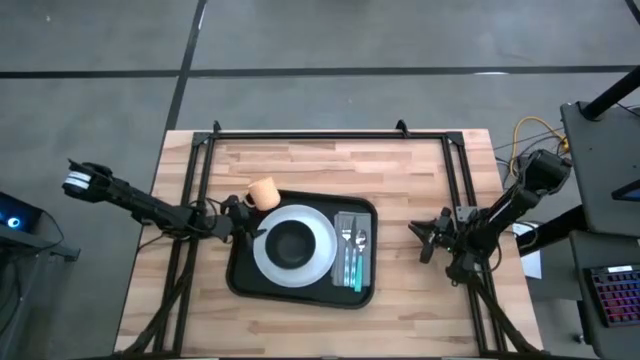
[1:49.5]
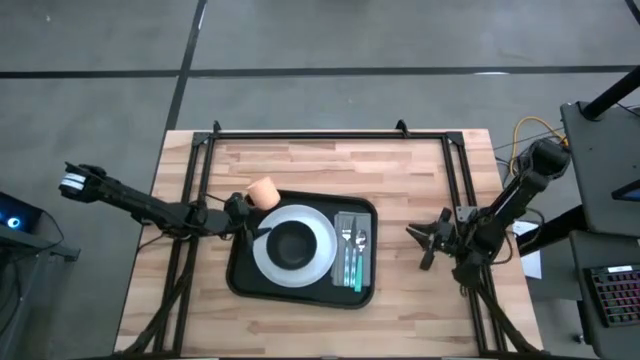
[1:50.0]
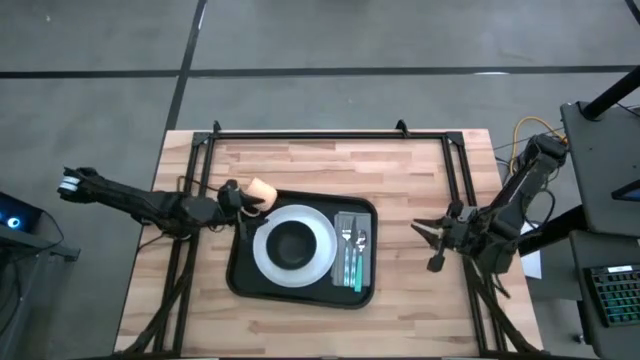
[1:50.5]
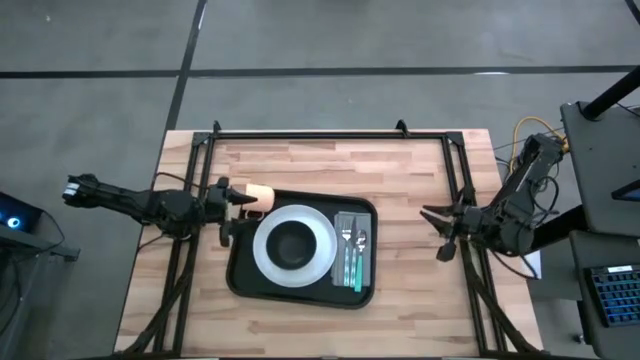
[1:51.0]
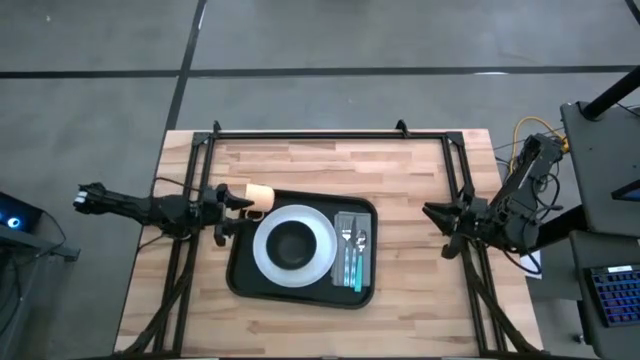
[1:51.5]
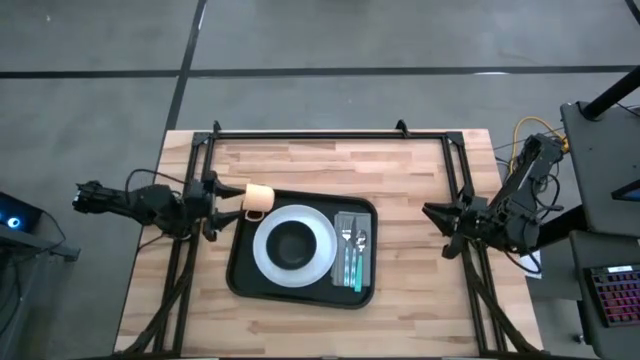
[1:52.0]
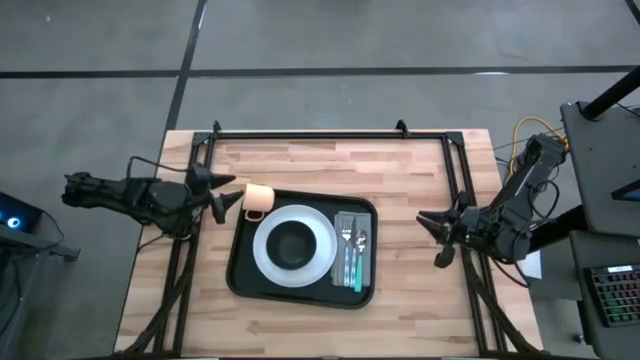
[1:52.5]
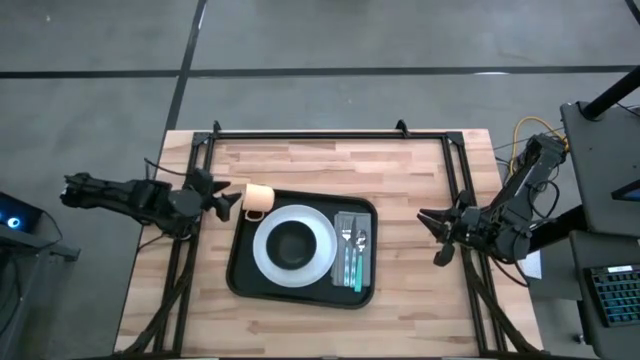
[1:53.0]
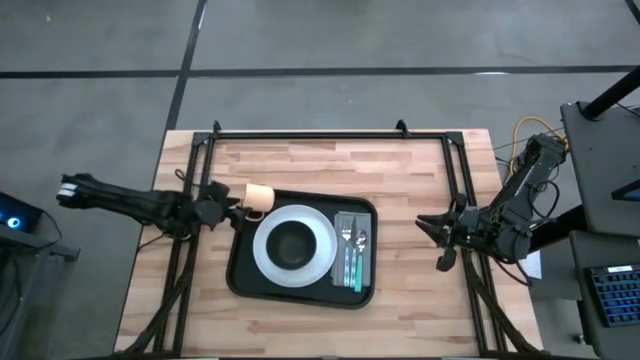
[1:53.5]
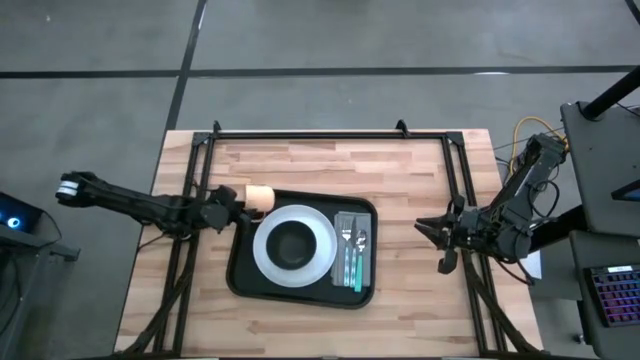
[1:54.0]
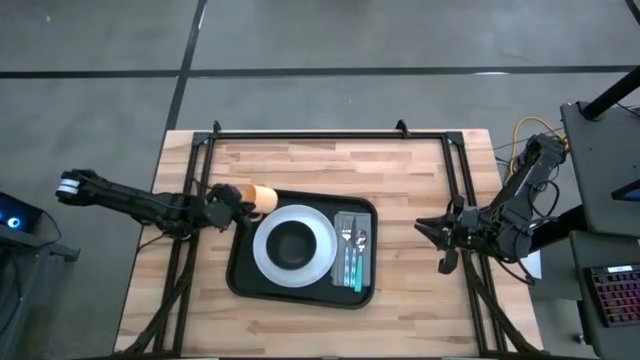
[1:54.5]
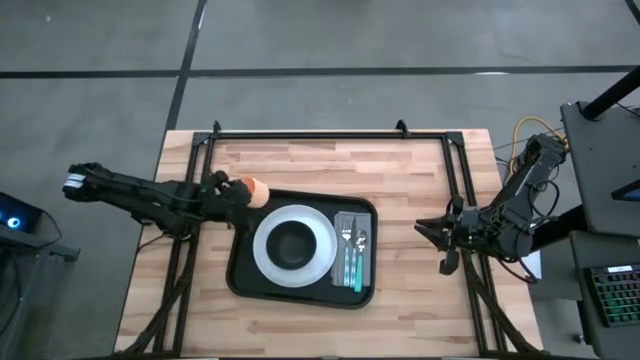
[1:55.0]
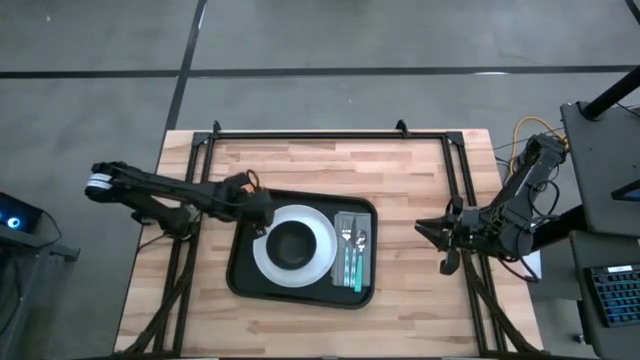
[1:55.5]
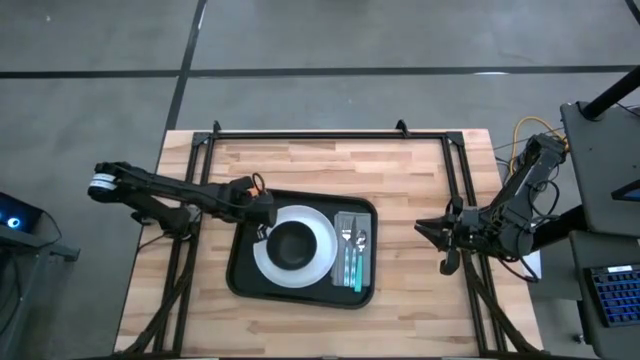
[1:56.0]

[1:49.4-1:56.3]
Task: Set up tray
Adjust the light orange mug on the black serving tray

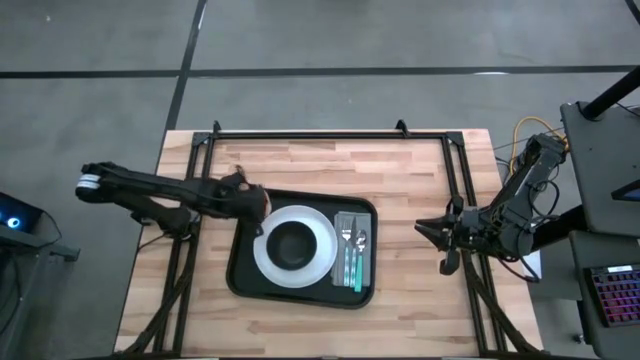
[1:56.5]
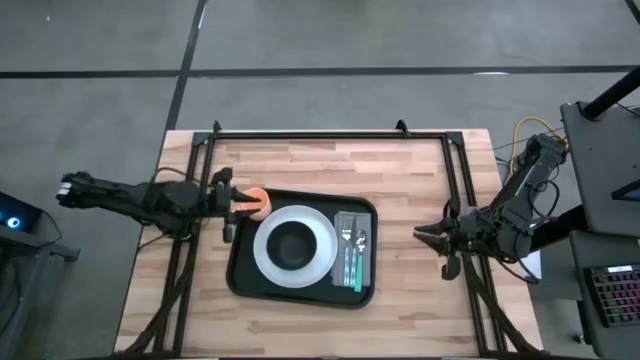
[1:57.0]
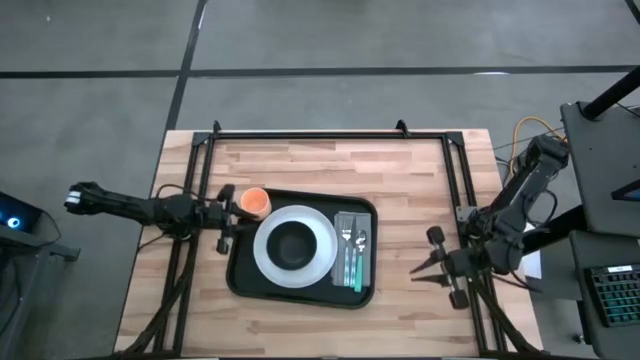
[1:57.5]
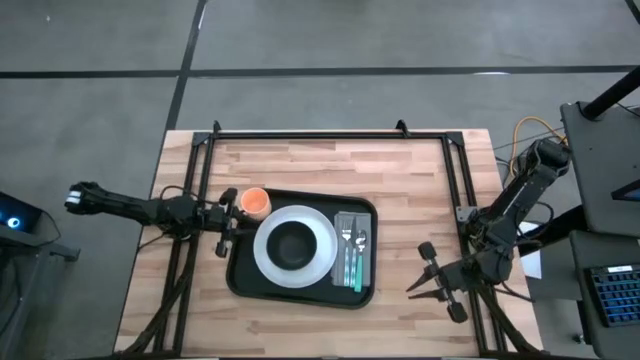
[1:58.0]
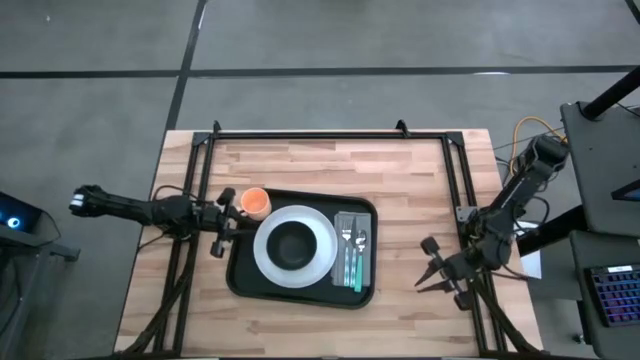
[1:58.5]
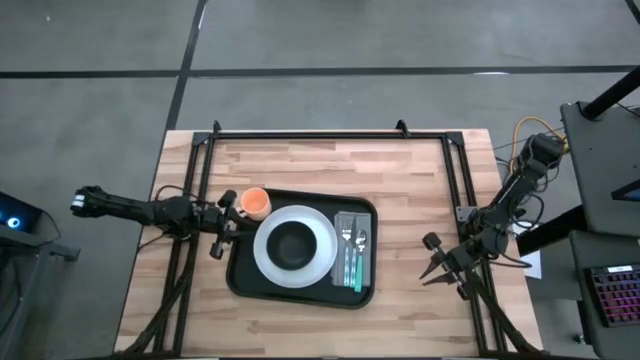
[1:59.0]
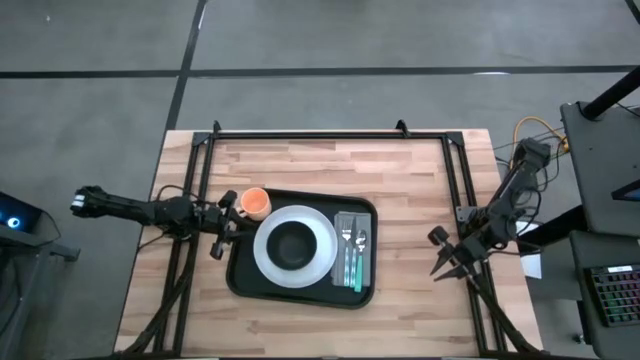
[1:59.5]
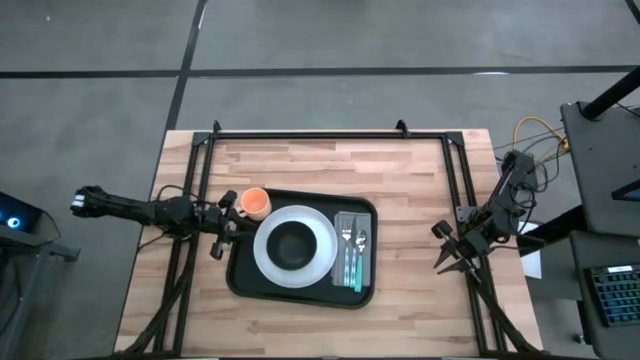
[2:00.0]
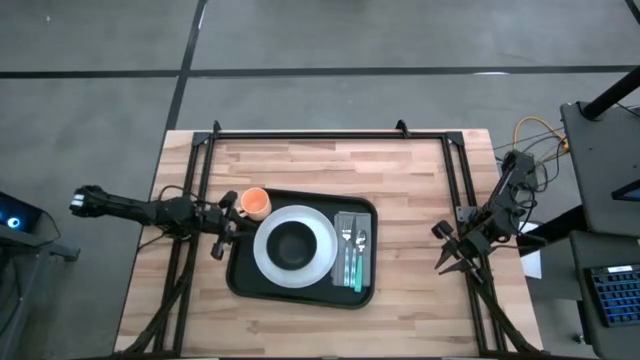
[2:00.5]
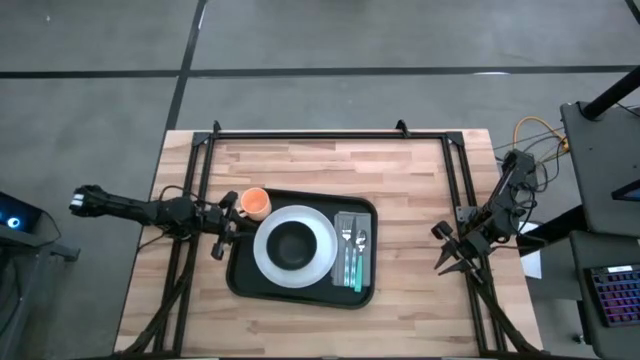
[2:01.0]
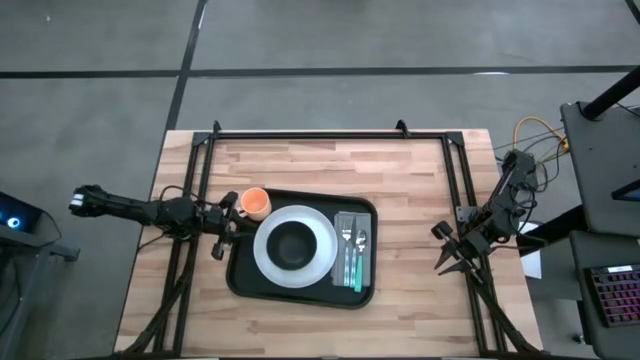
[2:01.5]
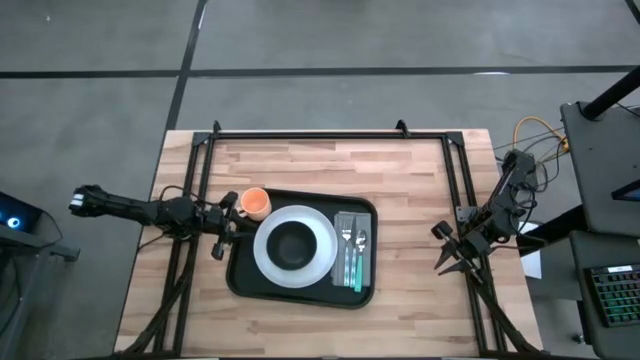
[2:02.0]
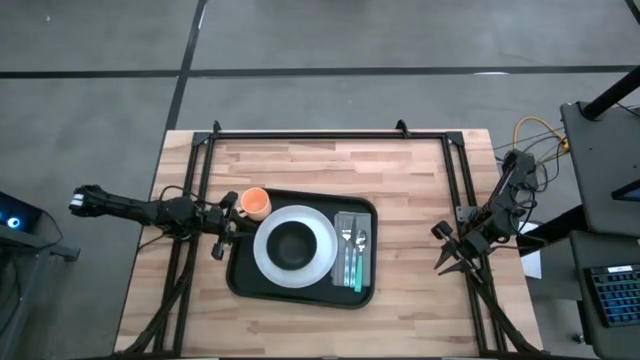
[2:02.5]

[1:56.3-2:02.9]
Return to Home Position

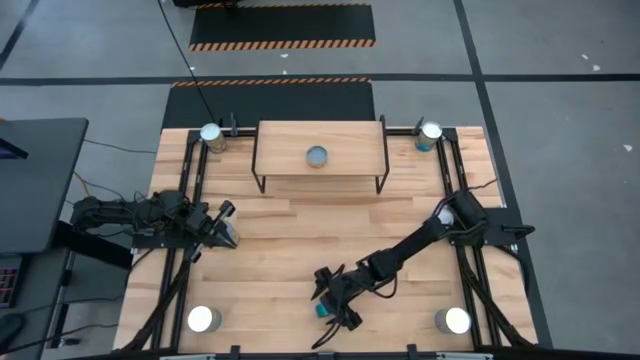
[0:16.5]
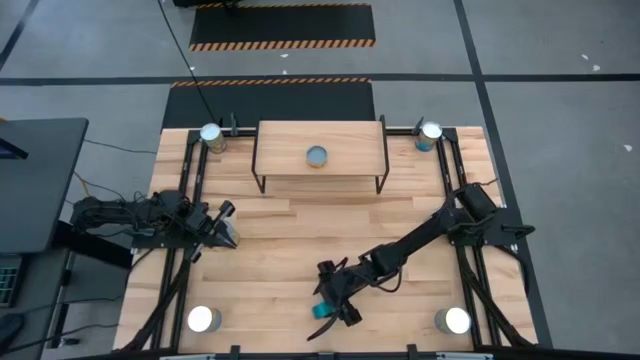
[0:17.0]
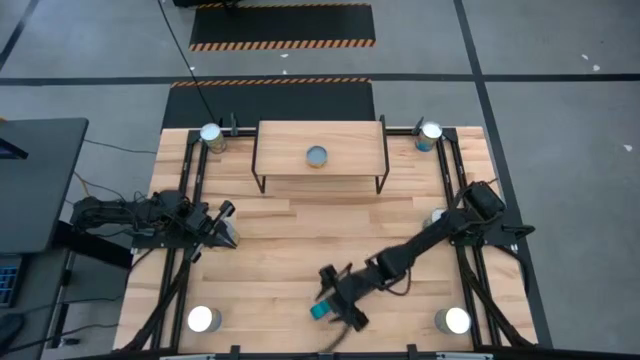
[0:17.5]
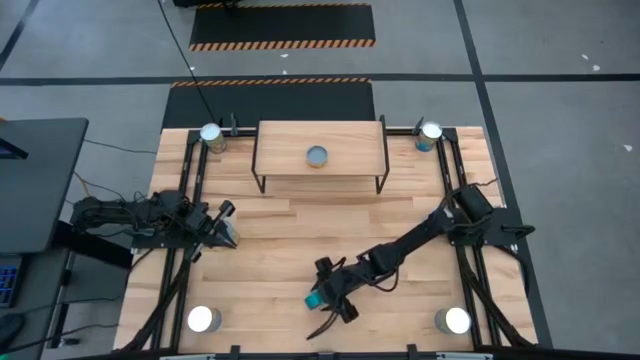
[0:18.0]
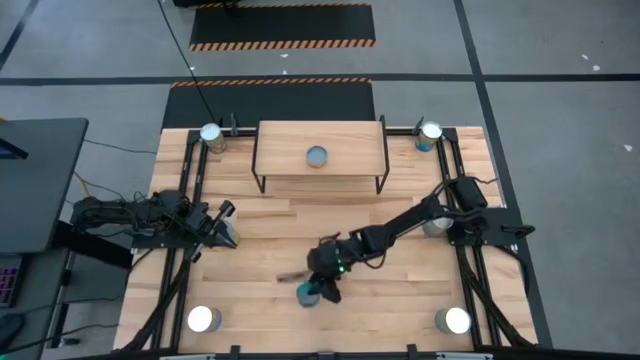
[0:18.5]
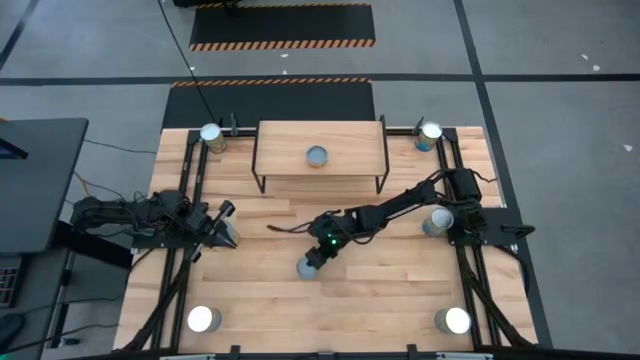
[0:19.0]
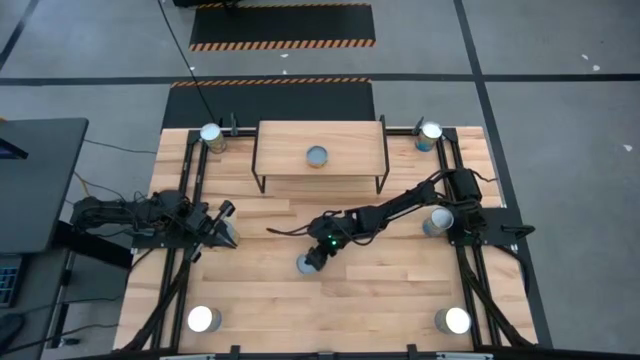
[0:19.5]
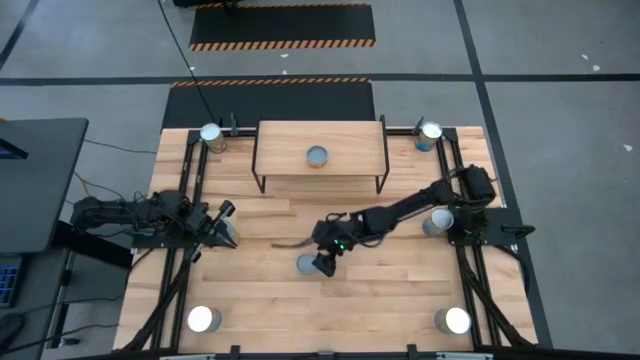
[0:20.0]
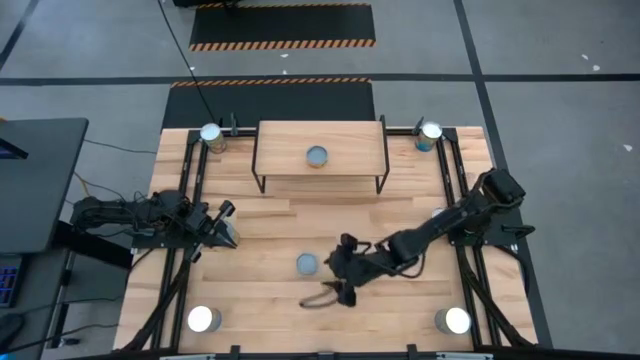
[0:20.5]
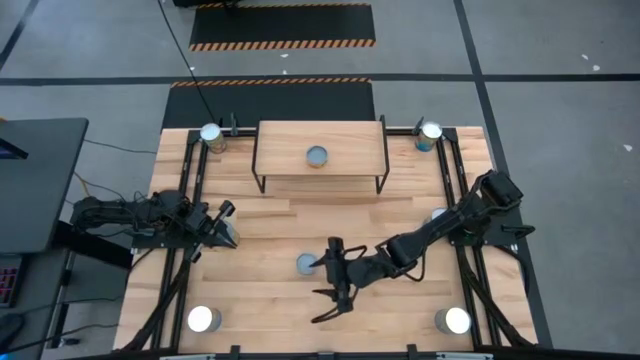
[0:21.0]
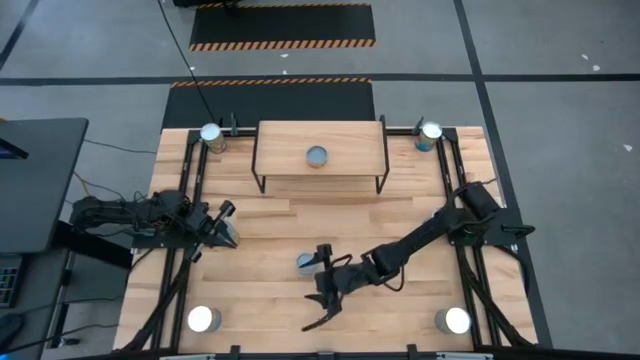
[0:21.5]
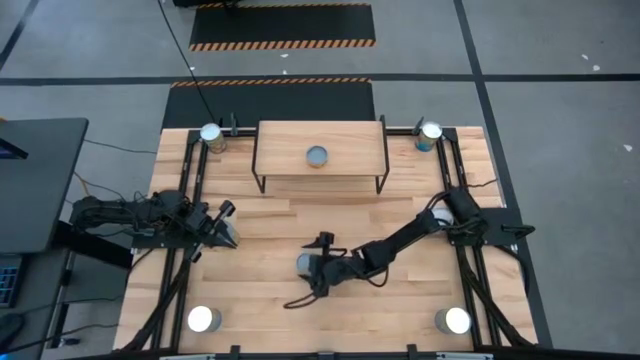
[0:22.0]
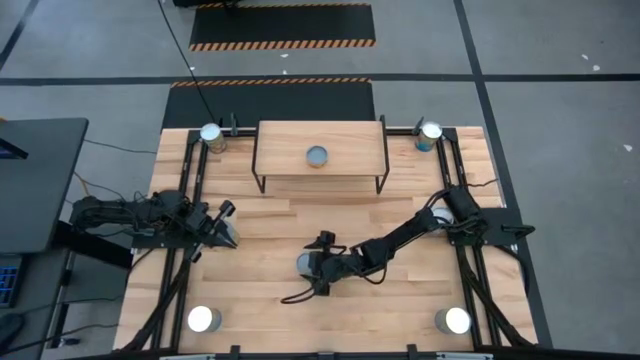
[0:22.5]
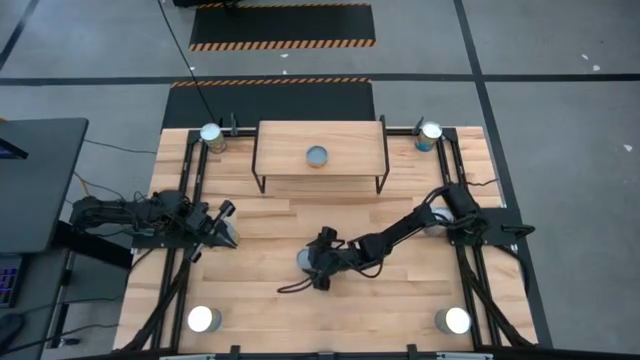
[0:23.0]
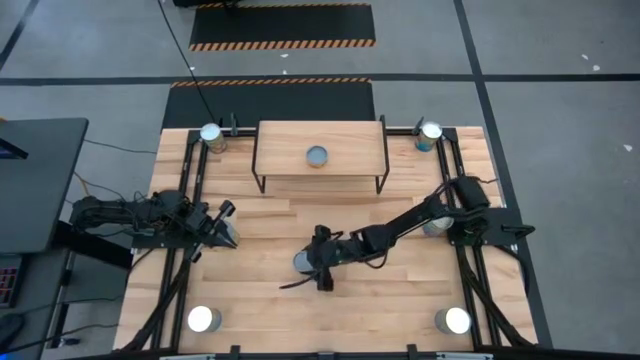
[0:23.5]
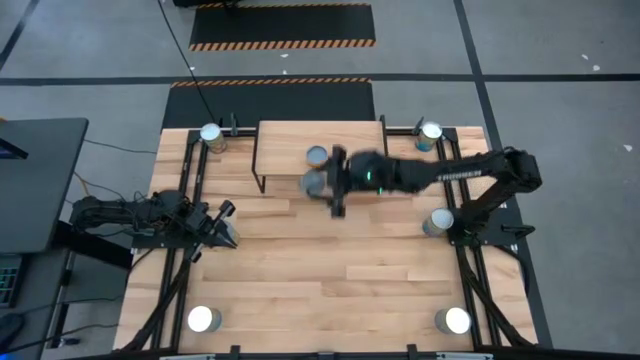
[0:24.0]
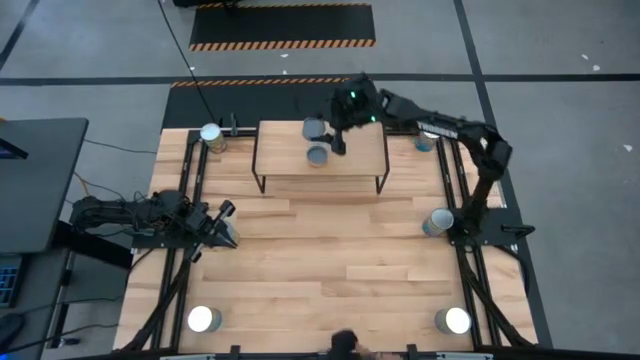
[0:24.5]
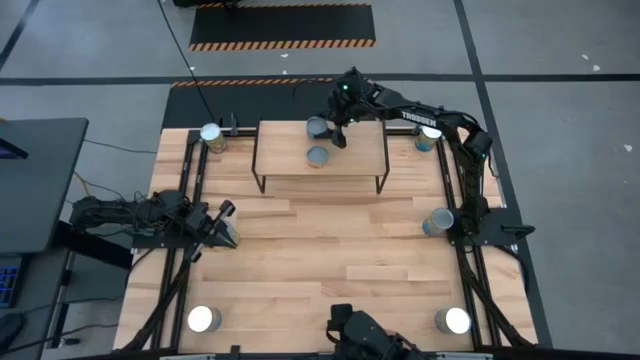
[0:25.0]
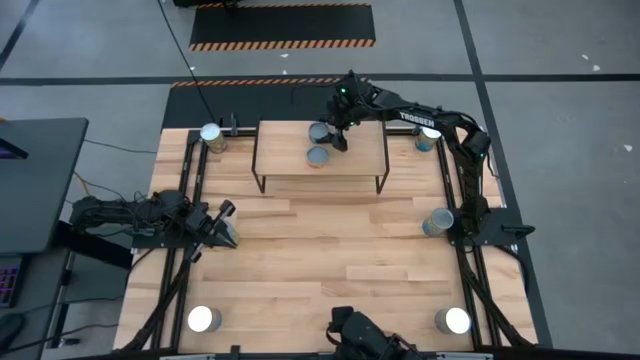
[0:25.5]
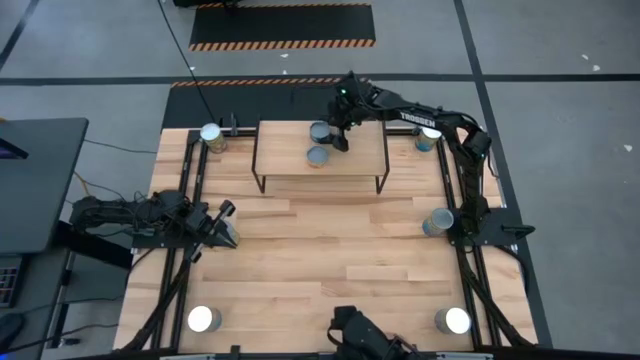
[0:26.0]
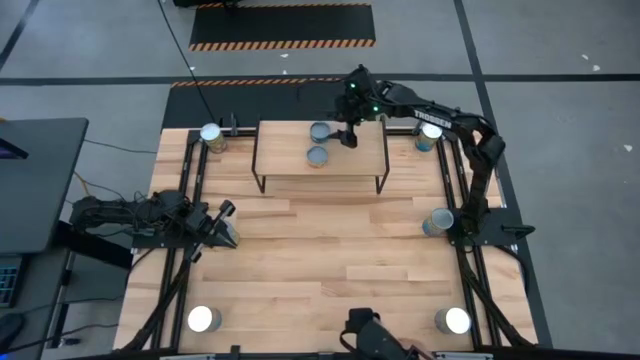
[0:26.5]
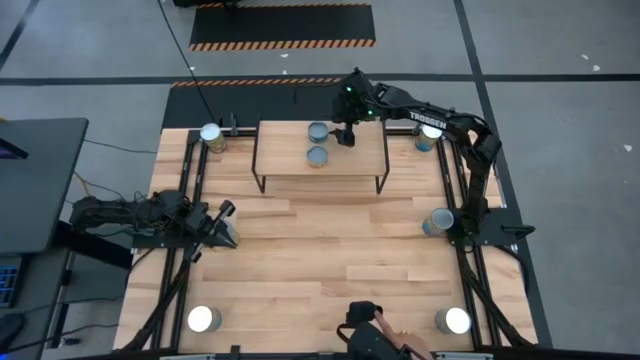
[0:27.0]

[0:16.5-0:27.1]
Task: Pick and place cans onto a shelf
Put the small green tuna can on the shelf aligned with the other small yellow canned mushrooms
